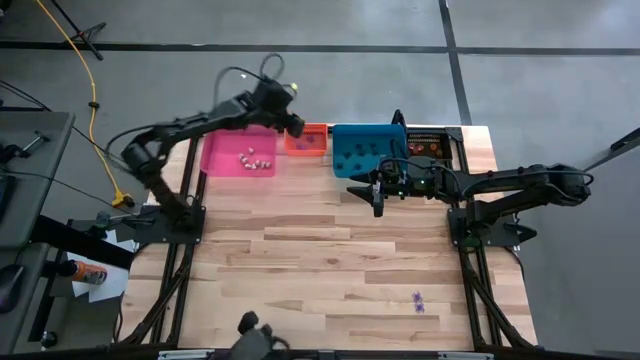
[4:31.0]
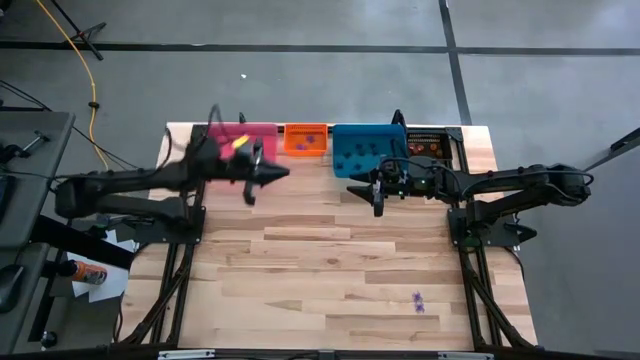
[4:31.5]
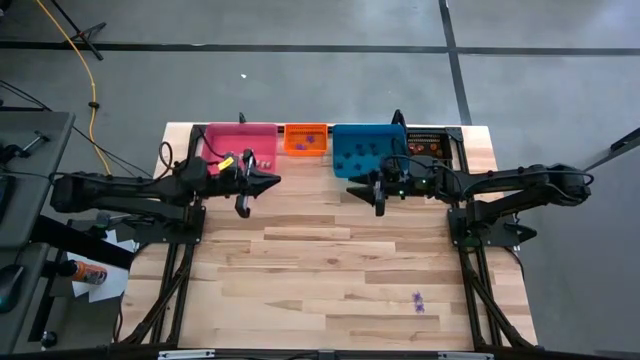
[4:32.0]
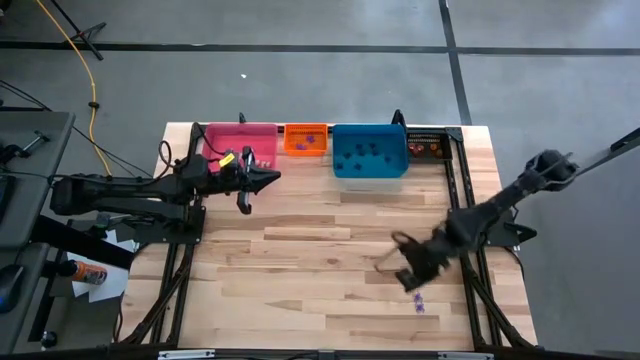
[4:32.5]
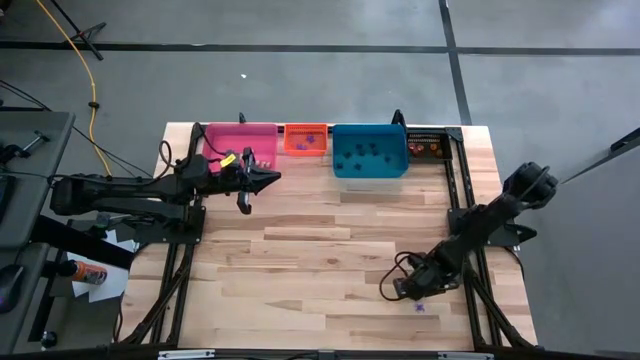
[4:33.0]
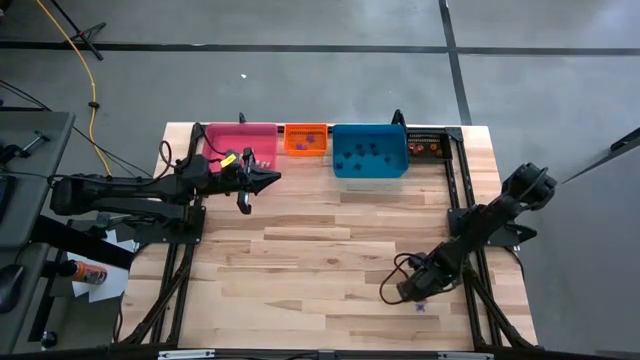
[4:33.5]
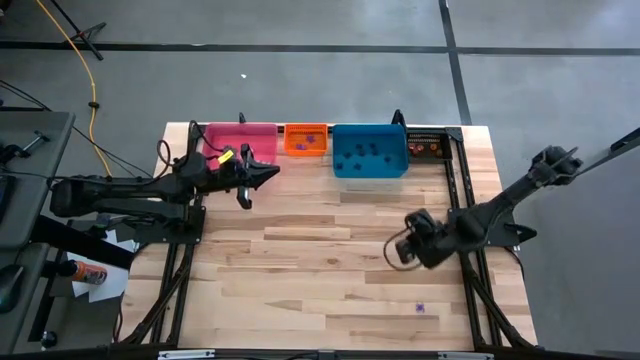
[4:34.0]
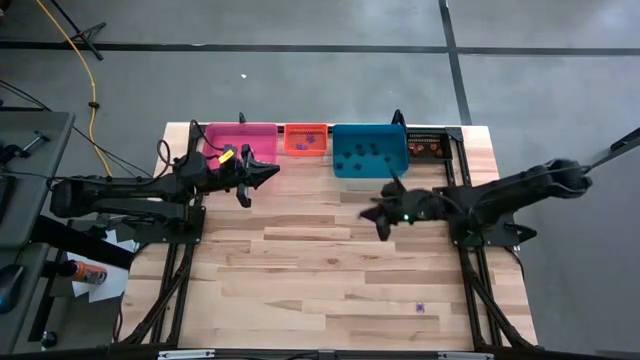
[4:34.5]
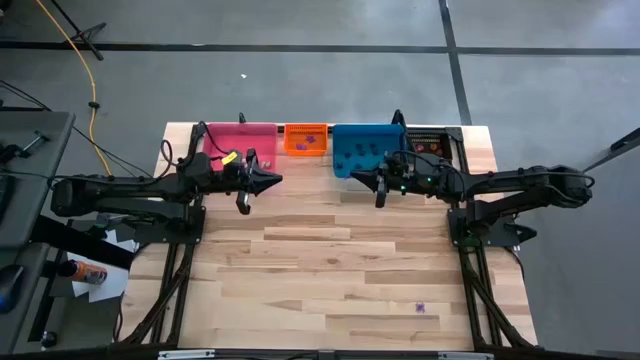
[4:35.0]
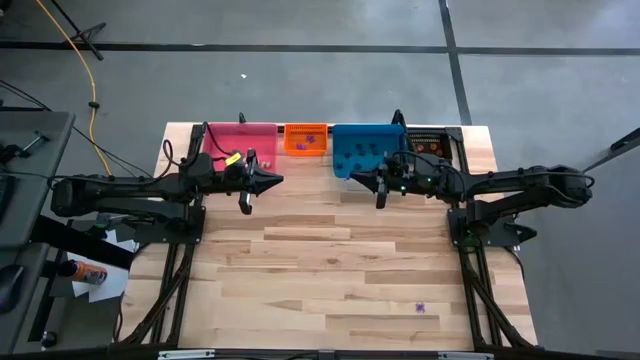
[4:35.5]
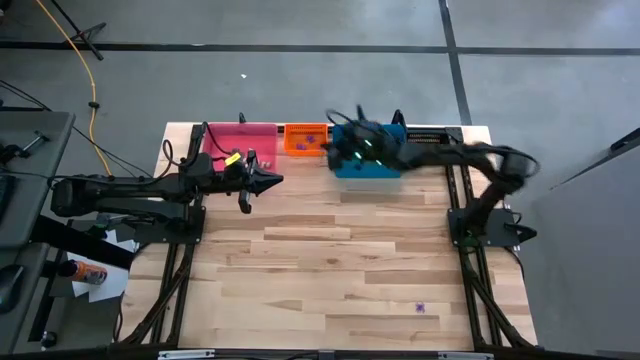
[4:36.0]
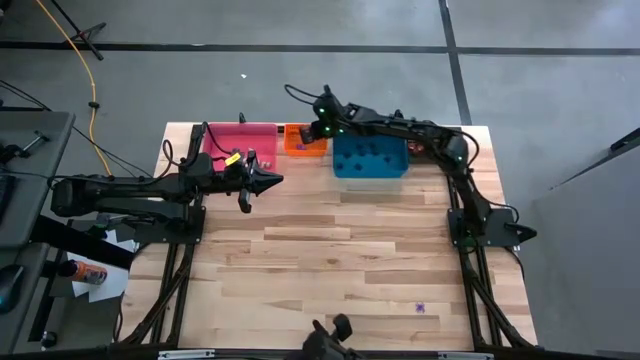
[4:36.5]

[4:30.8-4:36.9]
Task: Sort Halloween decoration
Put the violet spider toy into the orange bin

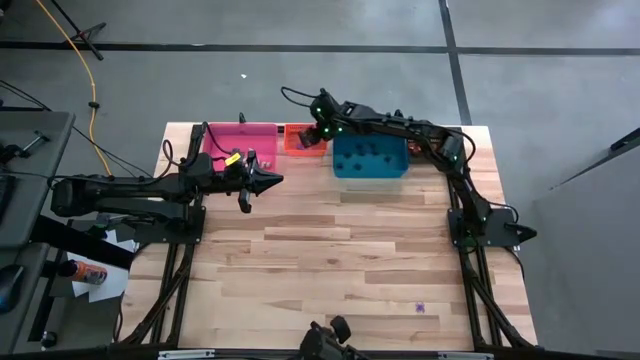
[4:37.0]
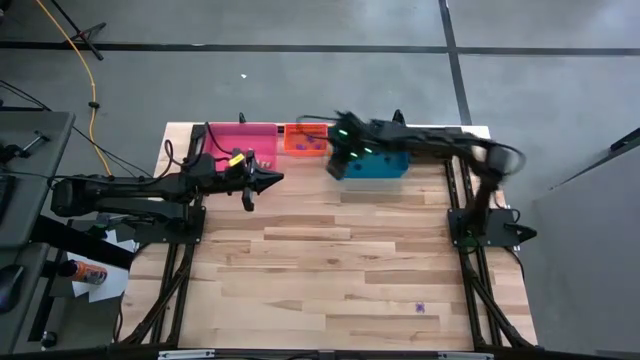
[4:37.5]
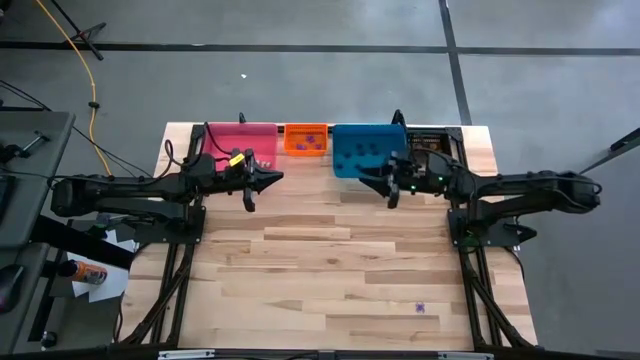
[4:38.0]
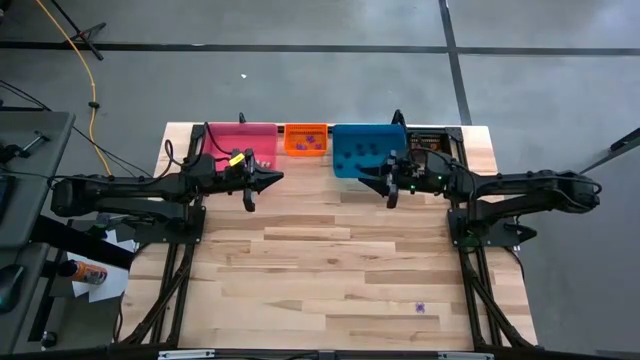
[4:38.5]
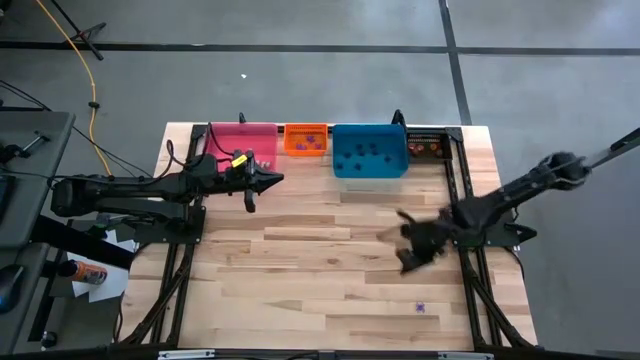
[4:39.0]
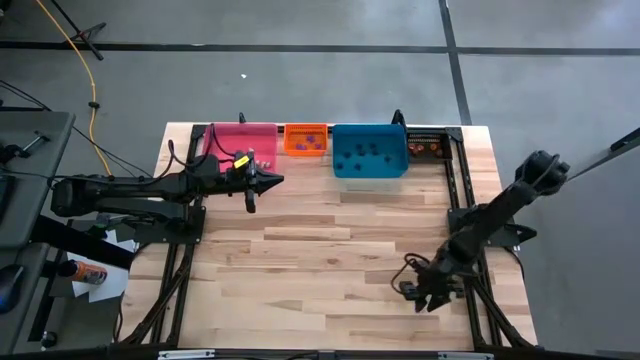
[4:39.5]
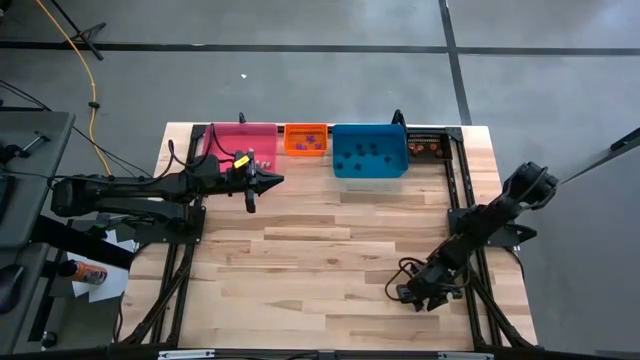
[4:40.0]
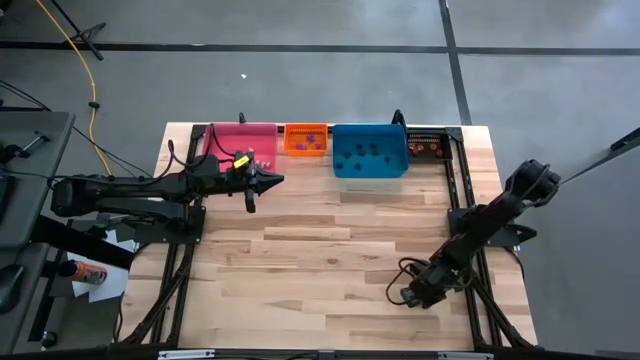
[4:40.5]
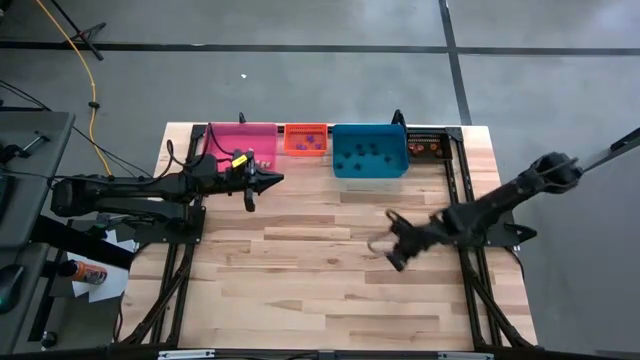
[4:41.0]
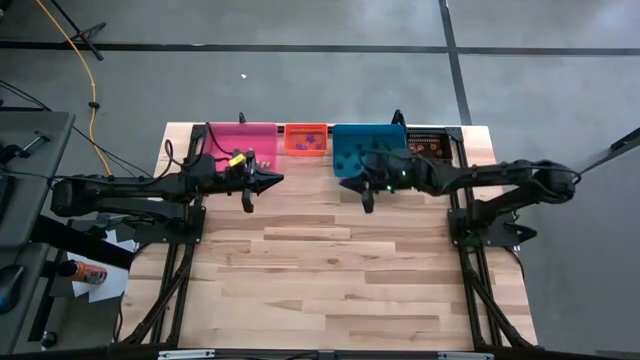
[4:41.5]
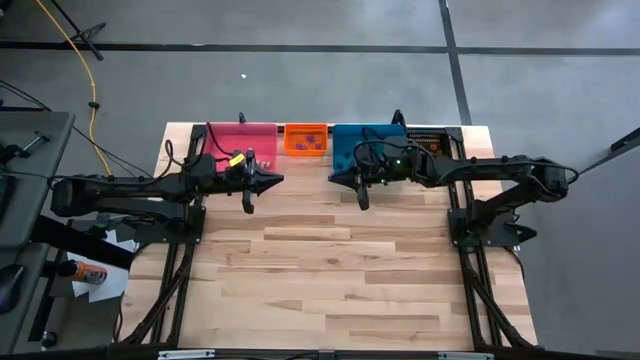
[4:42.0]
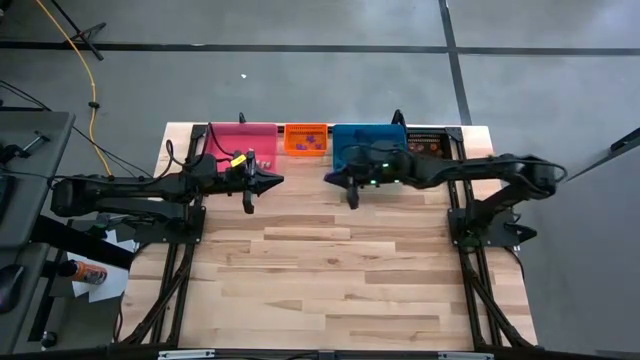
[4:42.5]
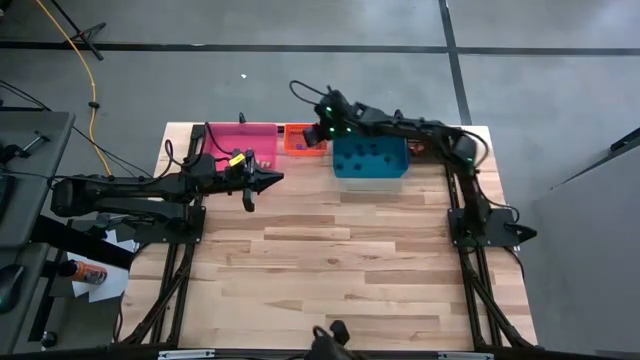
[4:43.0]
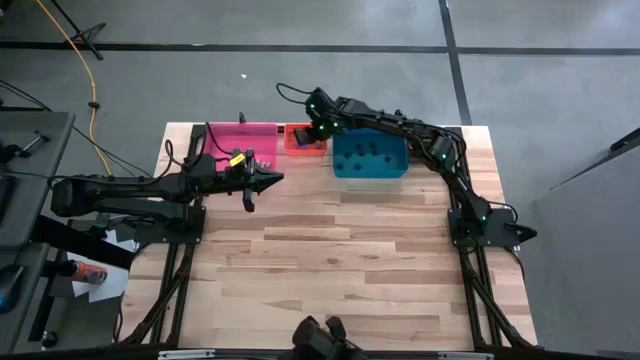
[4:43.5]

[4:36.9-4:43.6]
Put the violet spider toy into the orange bin

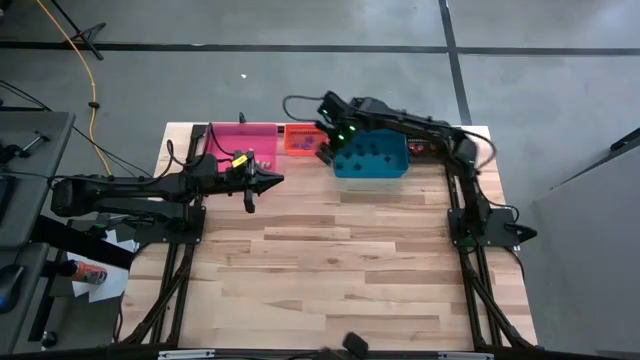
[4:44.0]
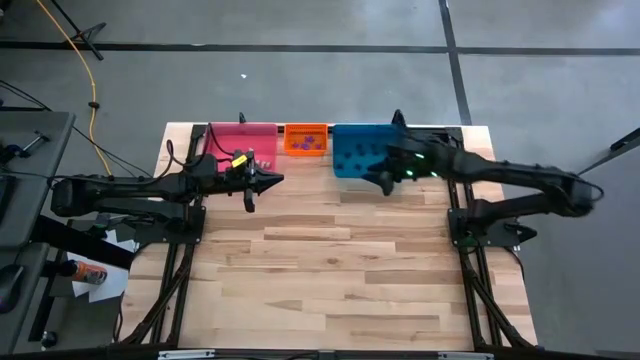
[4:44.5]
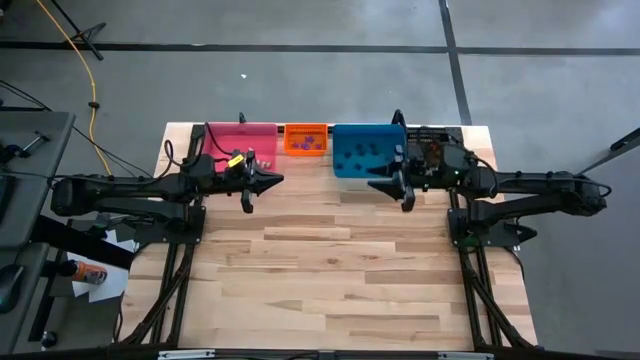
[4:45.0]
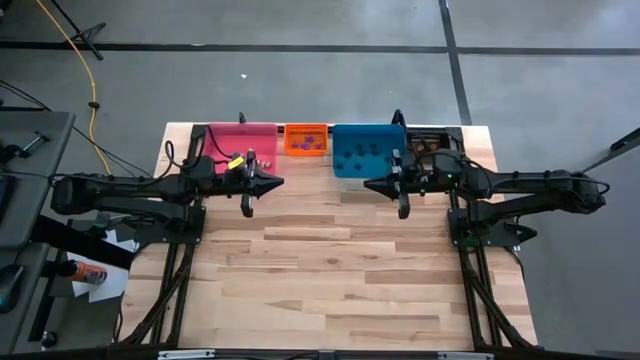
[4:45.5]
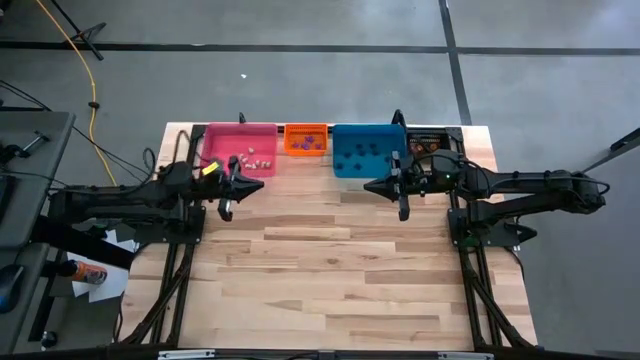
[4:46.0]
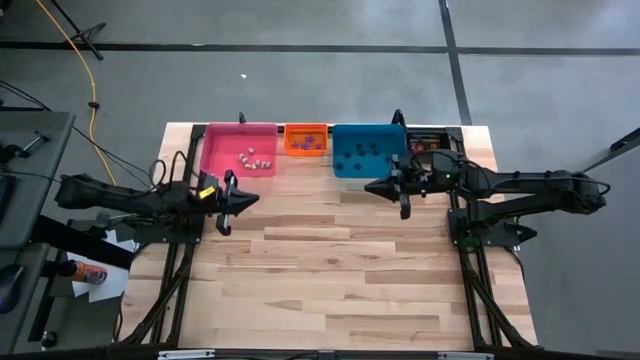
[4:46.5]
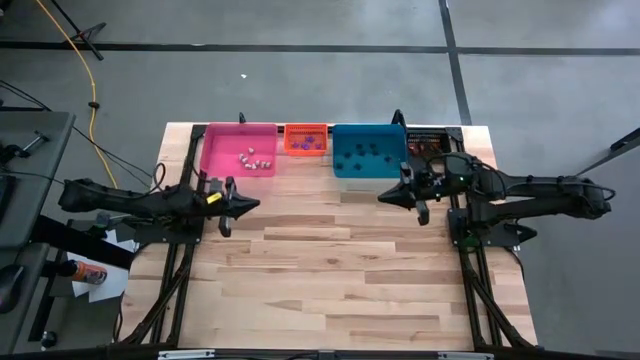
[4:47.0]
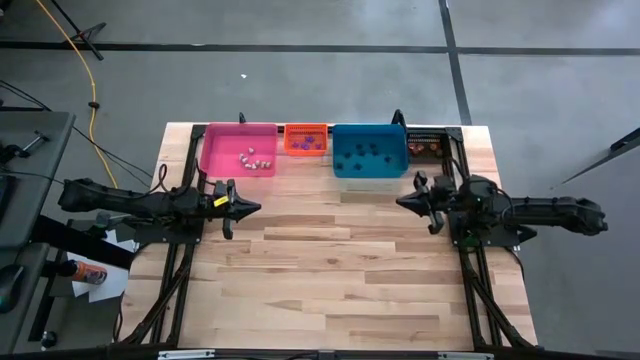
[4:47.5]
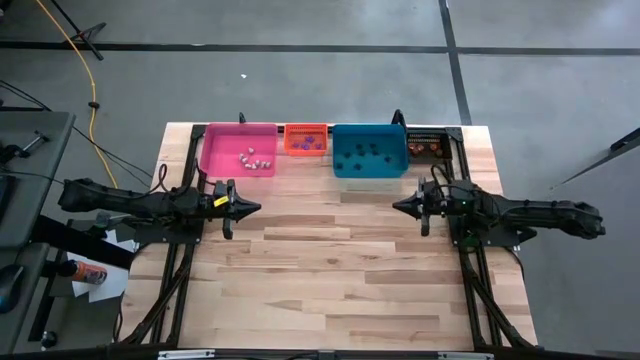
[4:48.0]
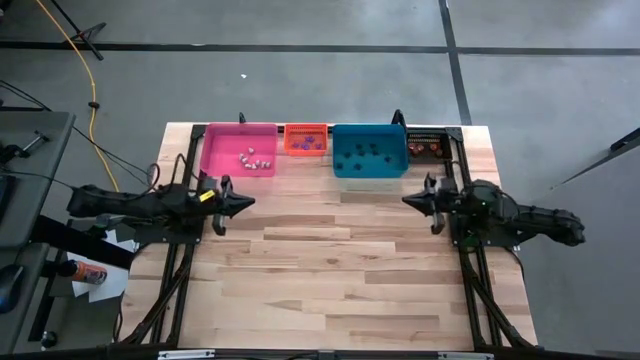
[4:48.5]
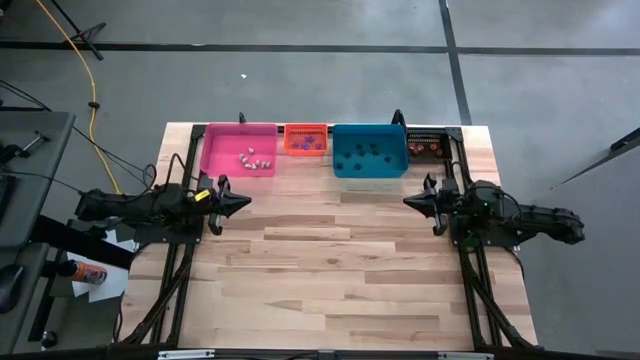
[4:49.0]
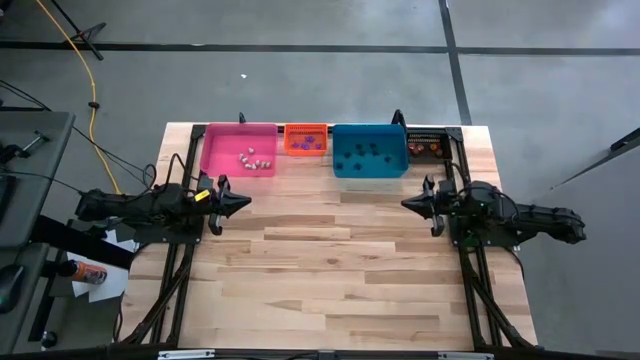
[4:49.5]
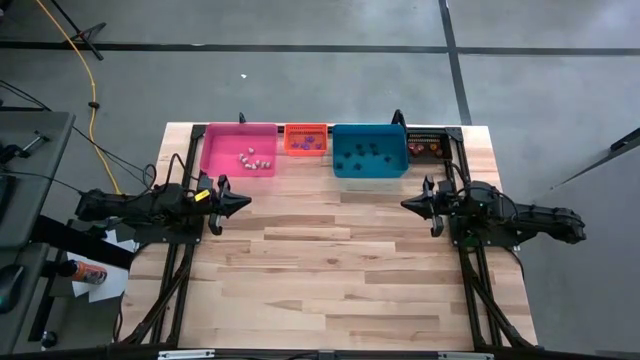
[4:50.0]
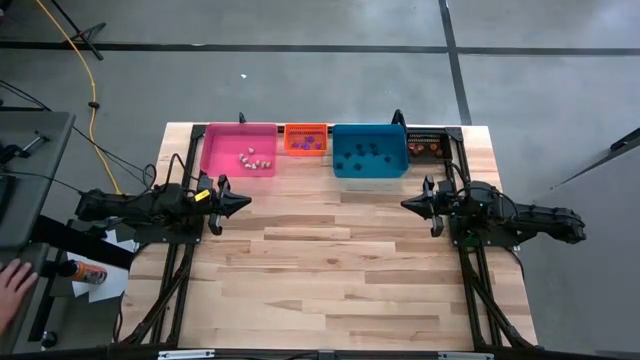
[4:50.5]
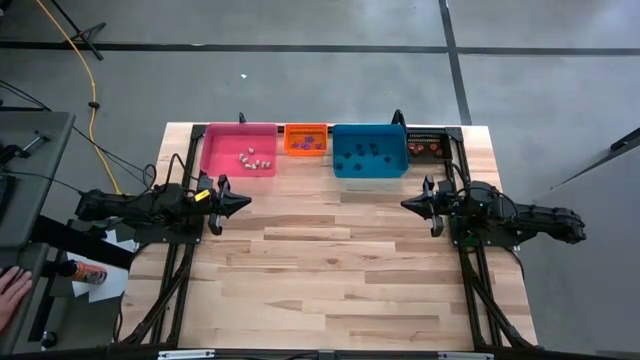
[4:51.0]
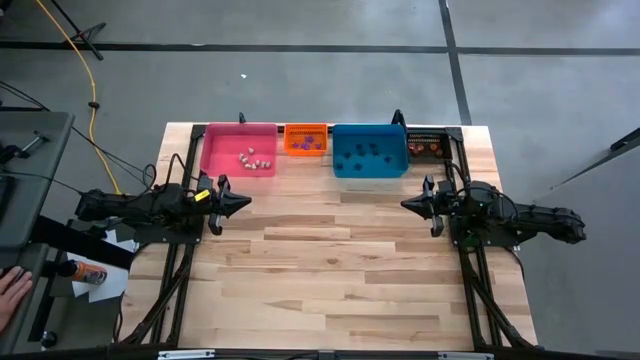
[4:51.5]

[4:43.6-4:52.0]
Return to Home Position
